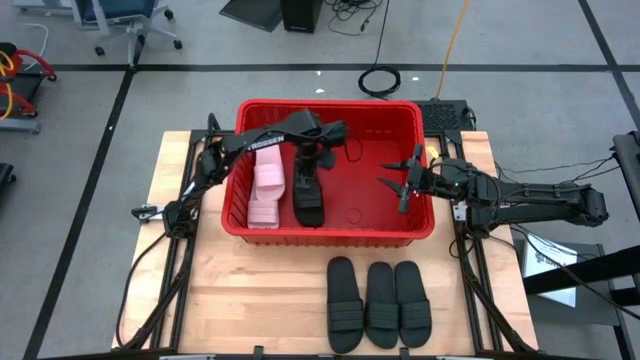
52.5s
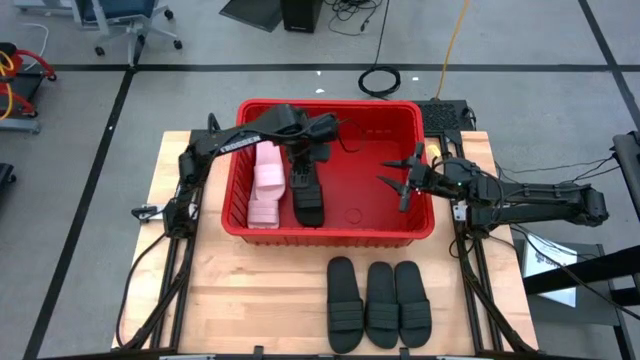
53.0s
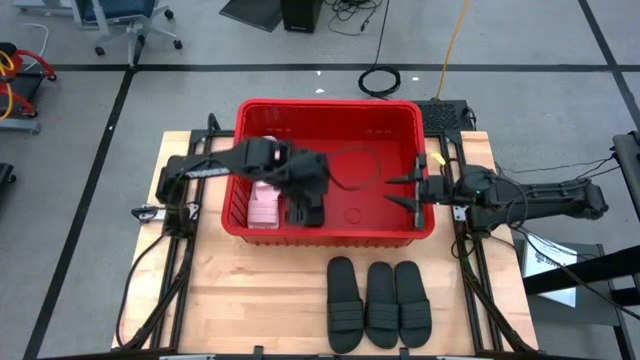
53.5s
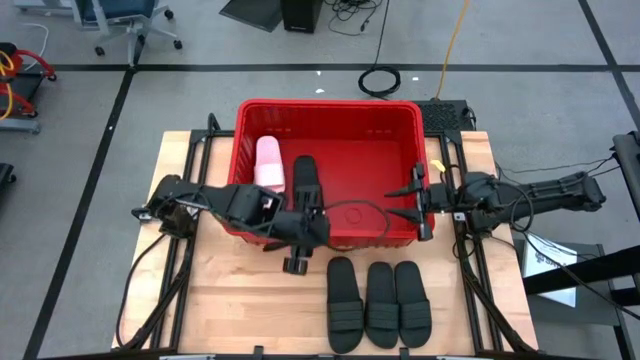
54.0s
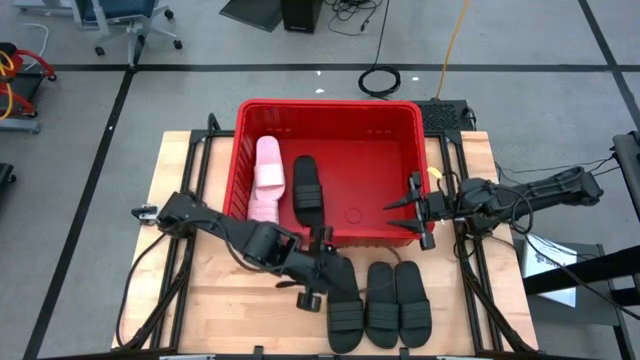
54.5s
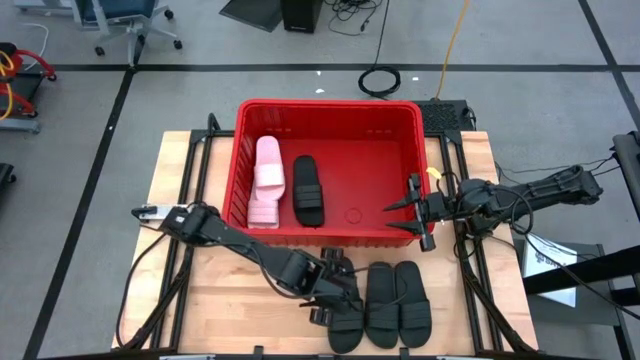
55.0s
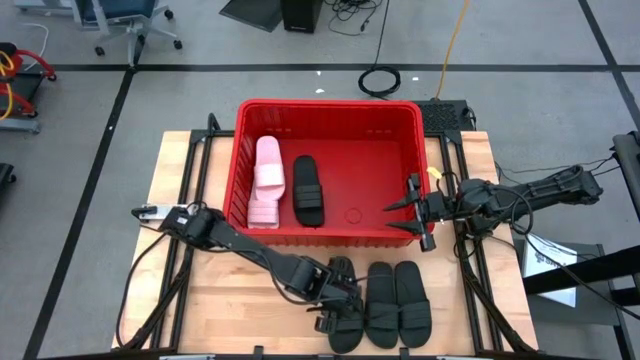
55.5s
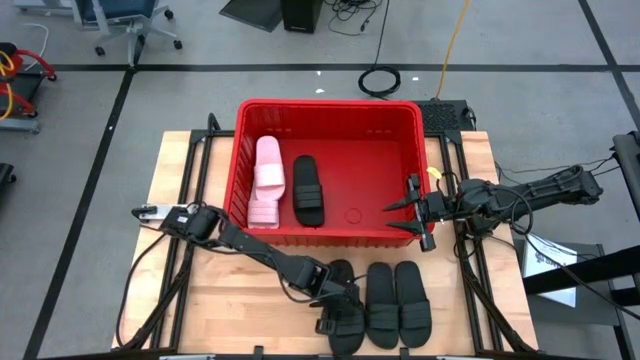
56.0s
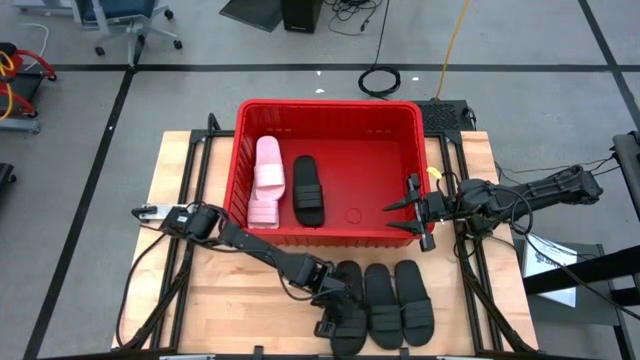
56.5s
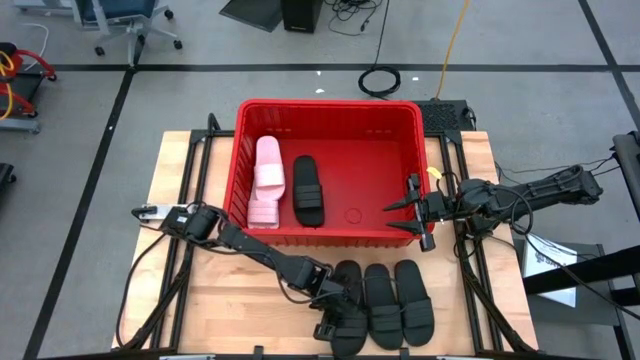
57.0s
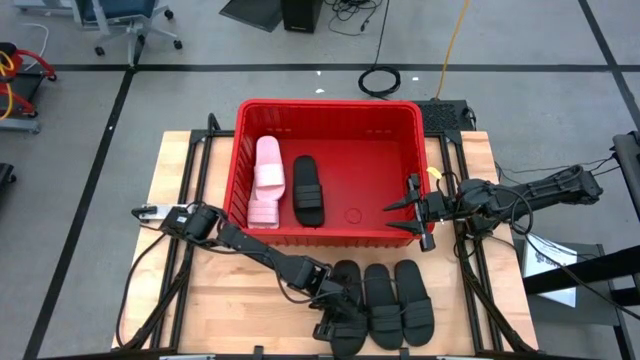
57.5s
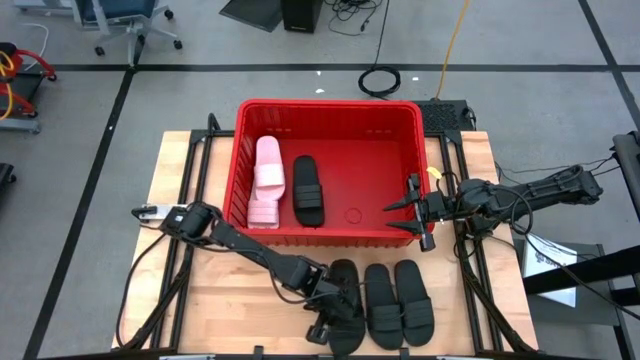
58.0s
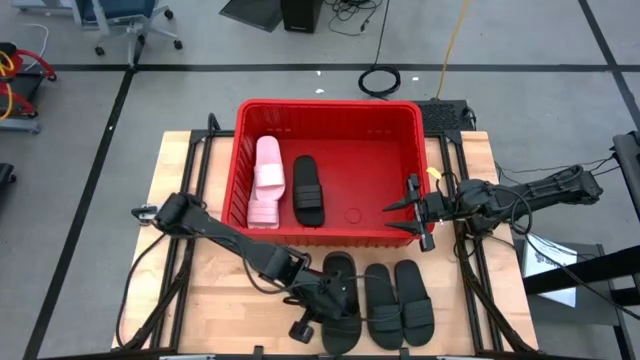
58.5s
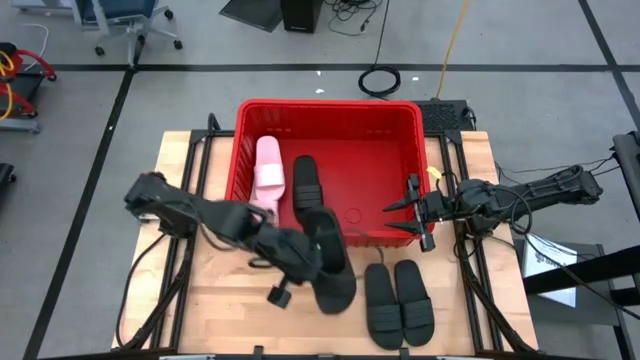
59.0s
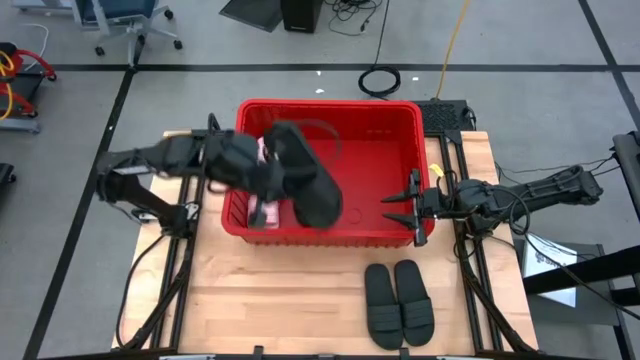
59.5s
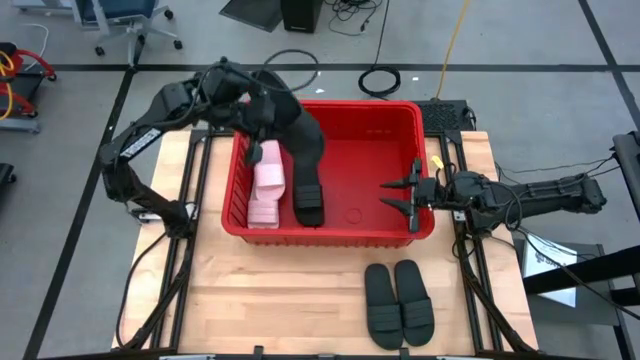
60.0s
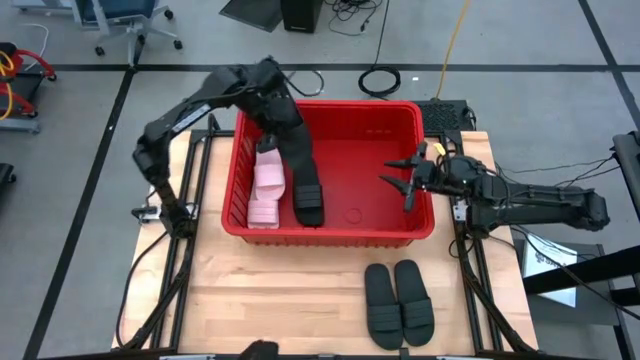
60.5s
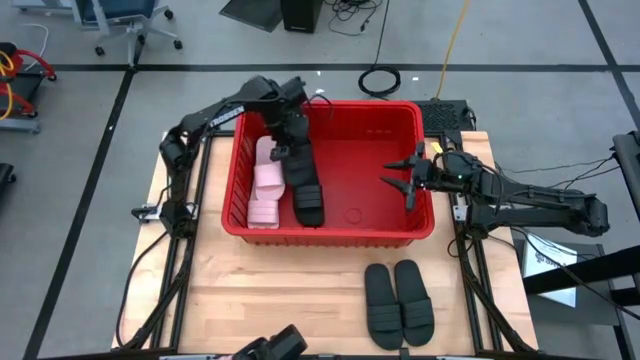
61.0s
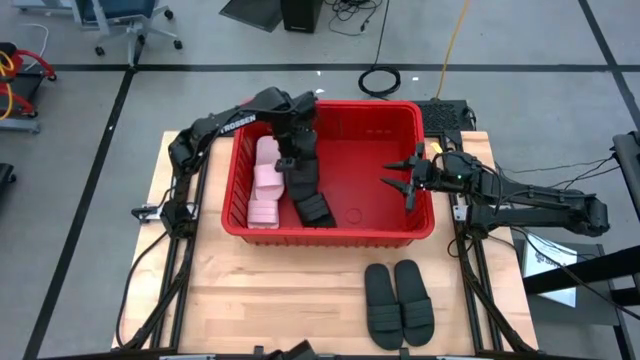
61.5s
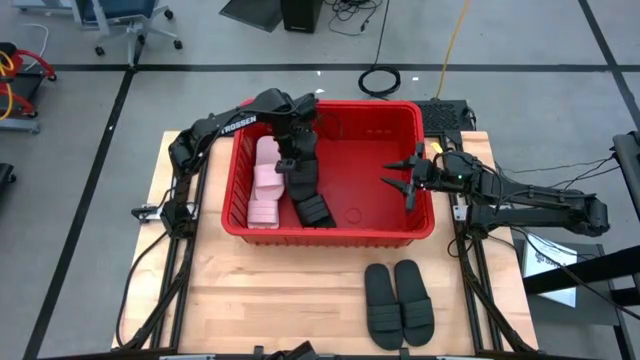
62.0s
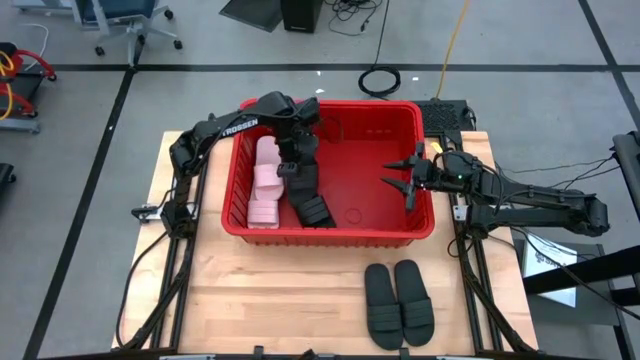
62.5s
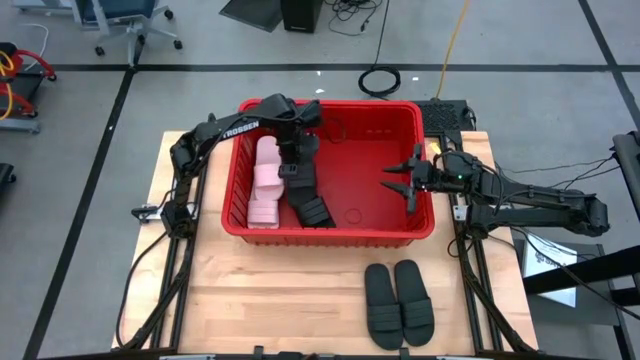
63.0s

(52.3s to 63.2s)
Task: Pick and place slides into bin
Put the black slide into the red bin

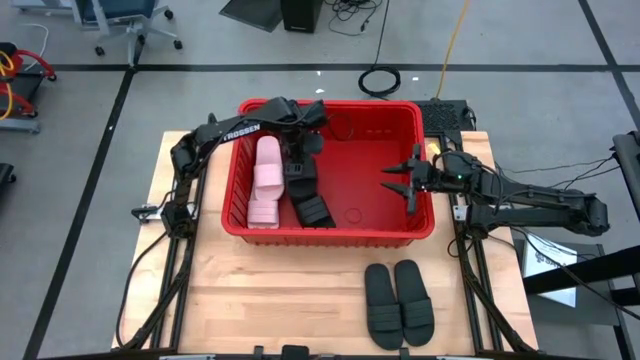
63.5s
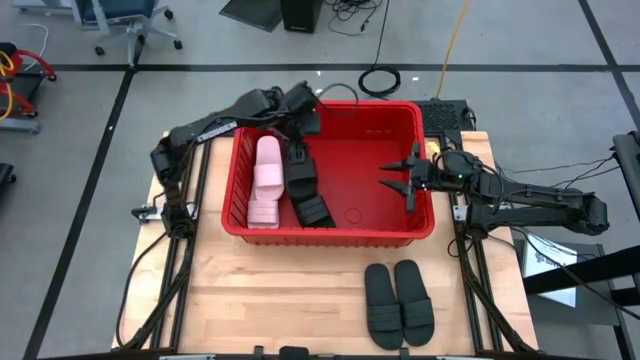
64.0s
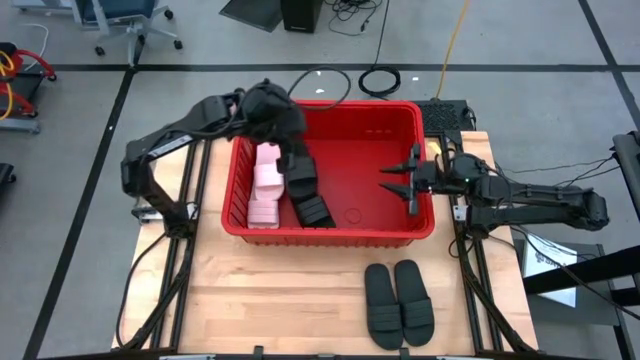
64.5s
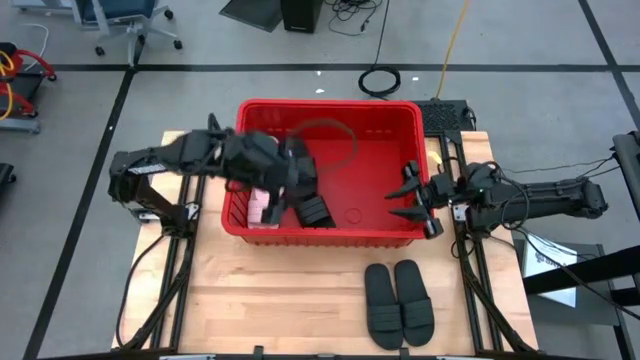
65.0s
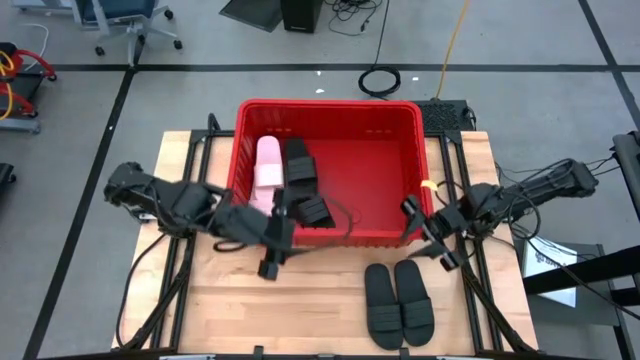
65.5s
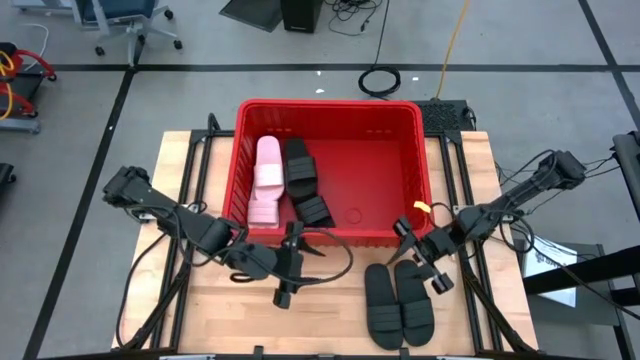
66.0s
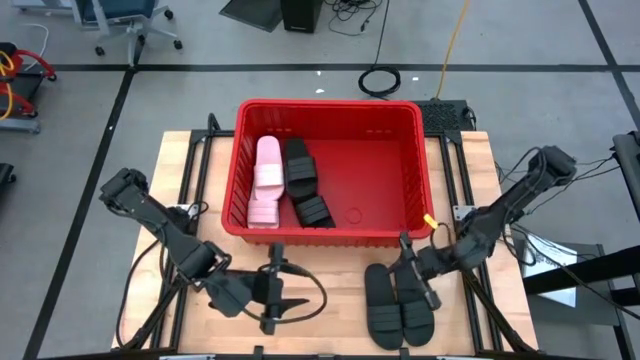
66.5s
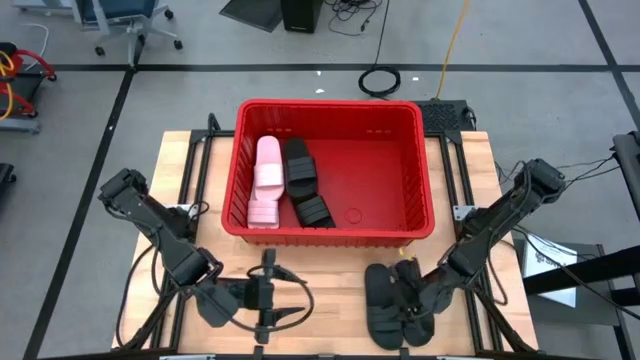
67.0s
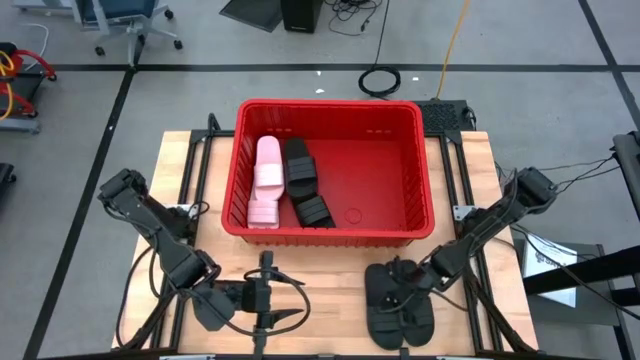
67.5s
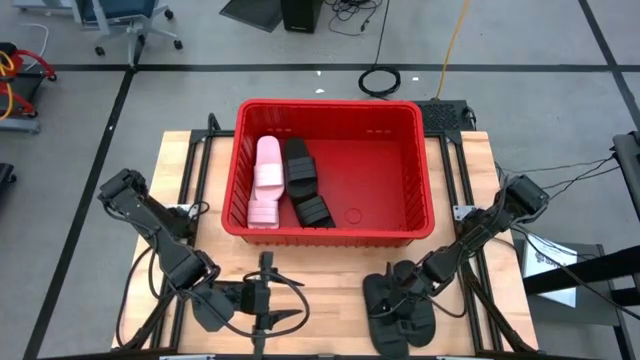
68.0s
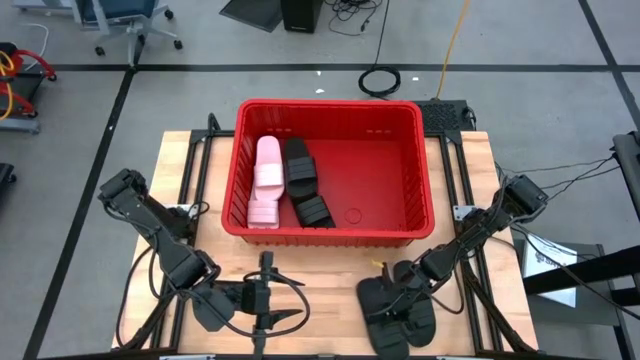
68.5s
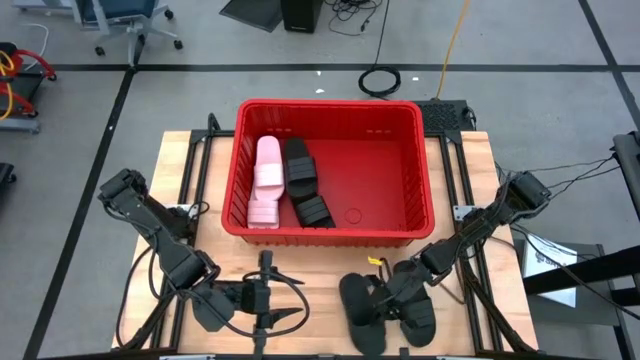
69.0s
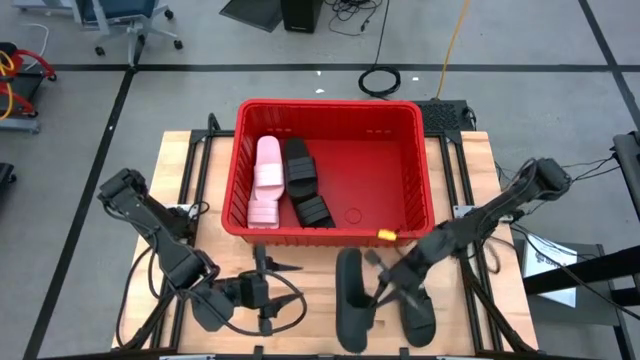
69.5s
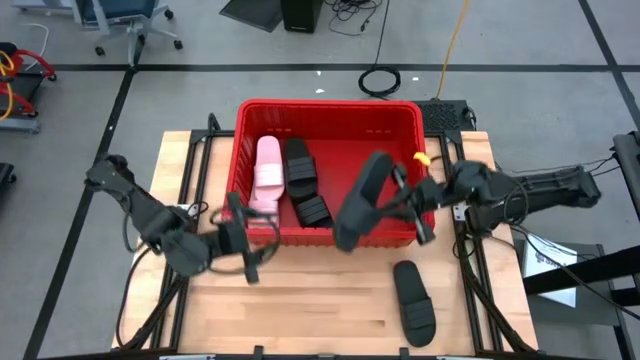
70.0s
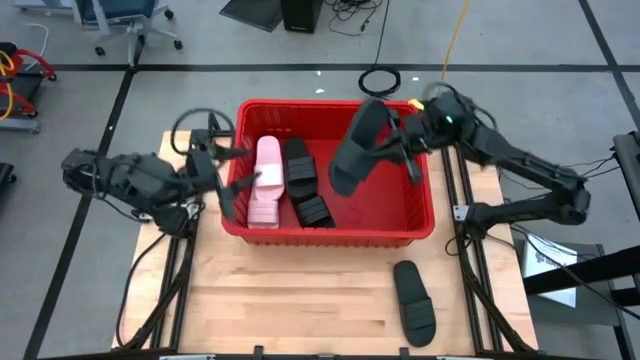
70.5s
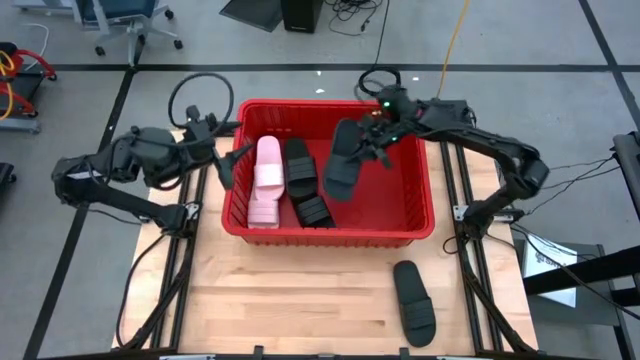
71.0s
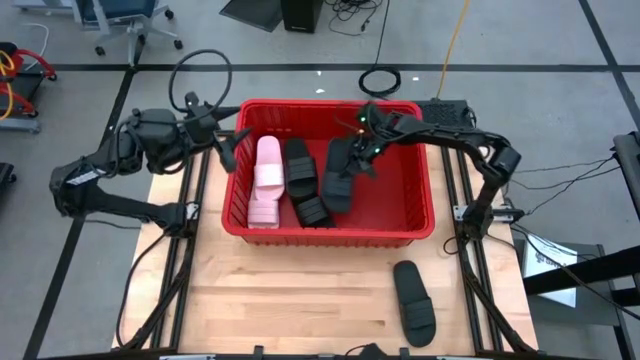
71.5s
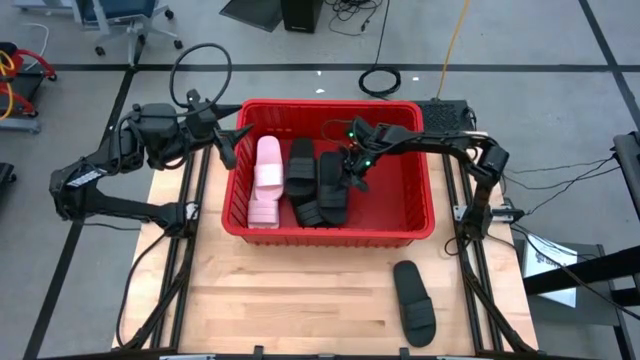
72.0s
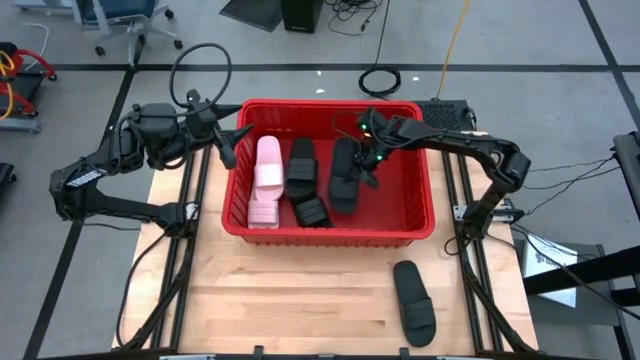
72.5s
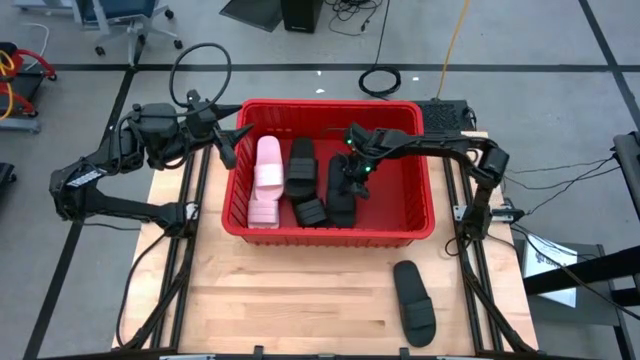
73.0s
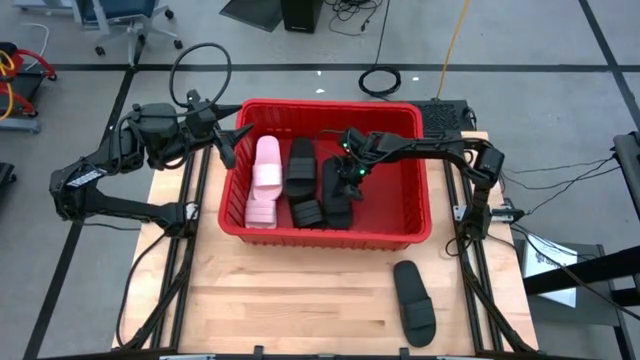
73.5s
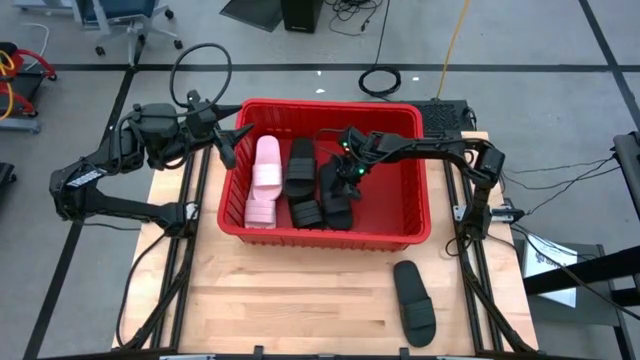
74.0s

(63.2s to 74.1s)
Put the black slide into the red bin
